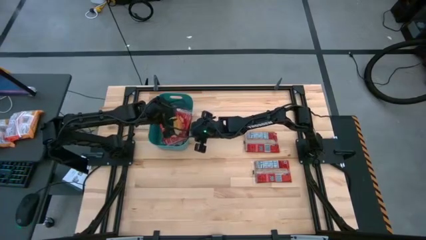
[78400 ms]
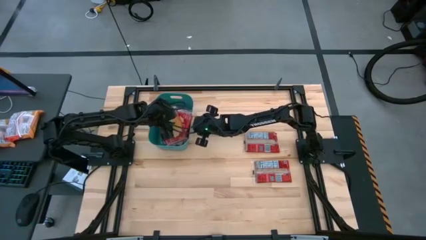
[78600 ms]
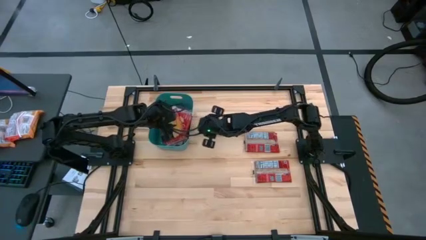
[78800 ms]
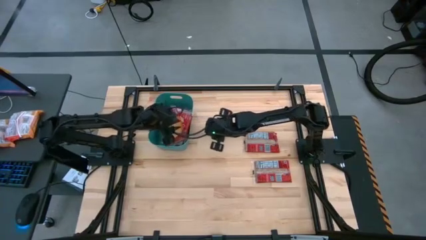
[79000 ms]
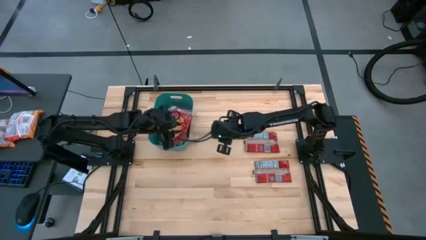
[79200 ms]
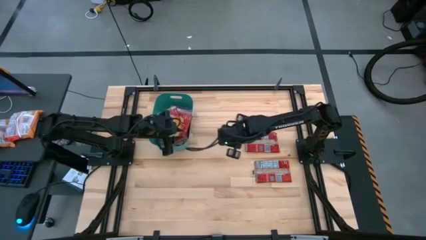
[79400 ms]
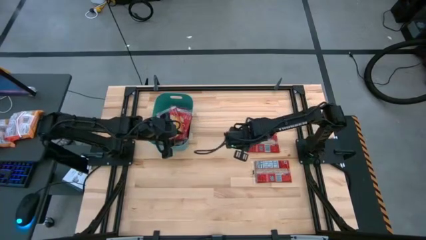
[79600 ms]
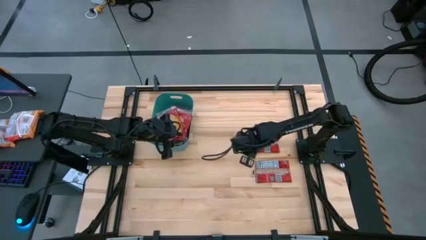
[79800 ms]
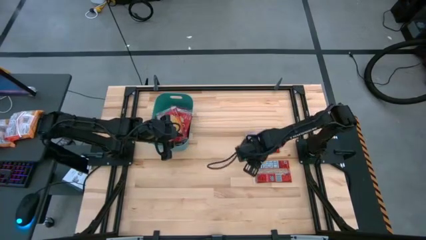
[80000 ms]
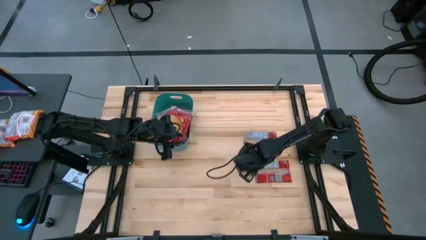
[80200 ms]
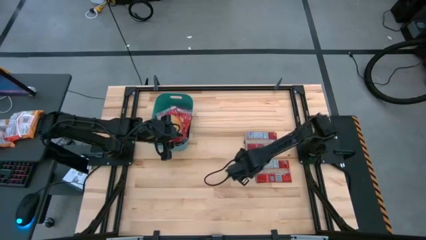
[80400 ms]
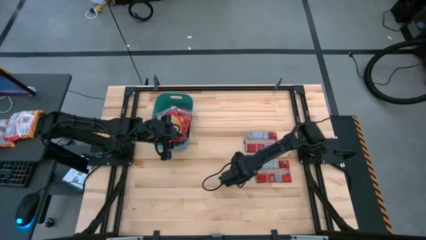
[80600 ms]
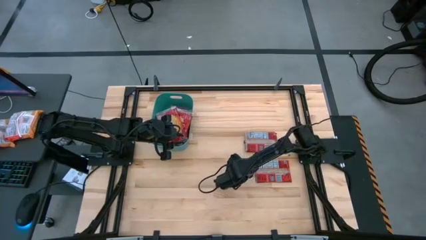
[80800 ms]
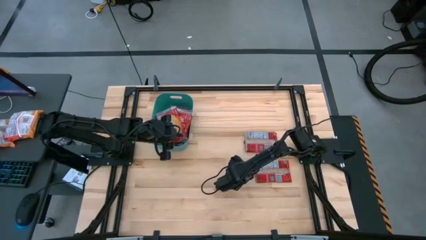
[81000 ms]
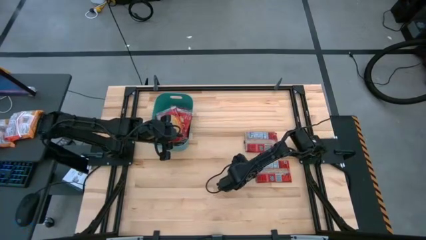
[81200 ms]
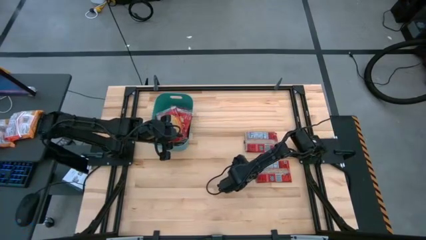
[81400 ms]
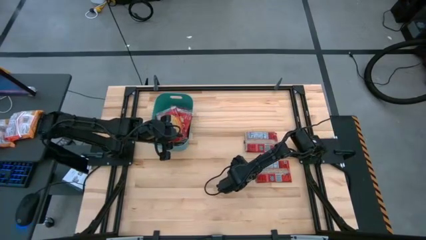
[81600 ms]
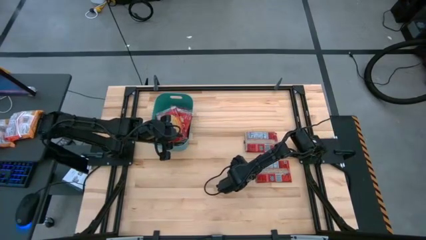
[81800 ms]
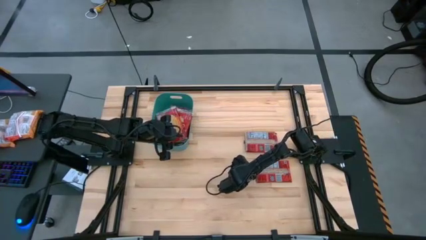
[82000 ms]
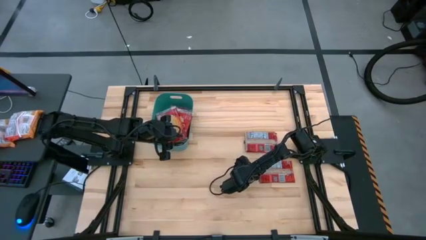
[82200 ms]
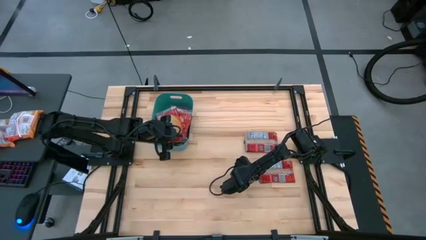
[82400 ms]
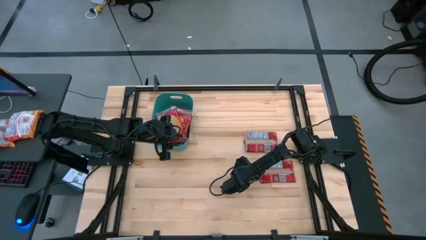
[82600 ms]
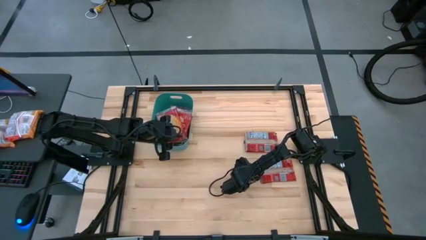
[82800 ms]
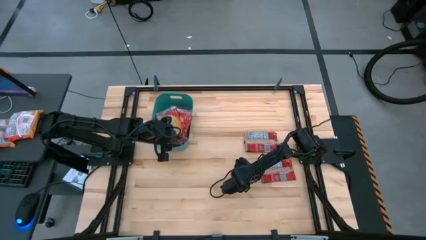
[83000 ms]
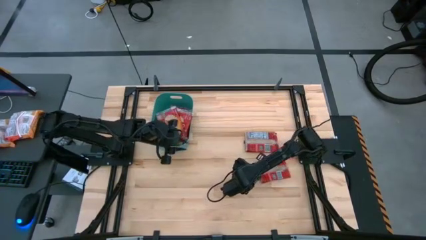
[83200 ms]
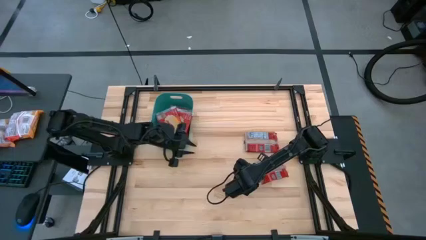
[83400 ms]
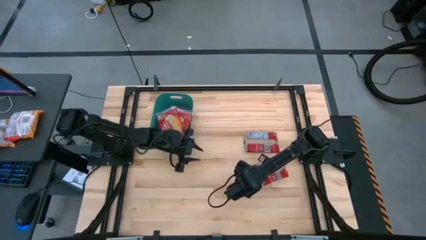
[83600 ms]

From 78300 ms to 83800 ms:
Task: Sort popcorn bags into baskets
Put the red popcorn bag into the green bin

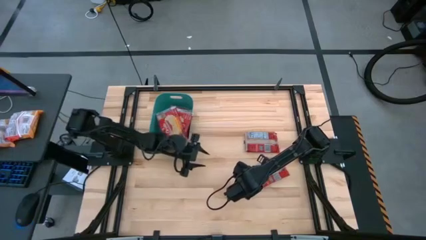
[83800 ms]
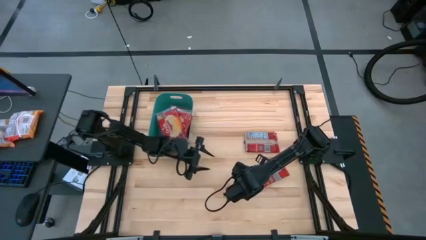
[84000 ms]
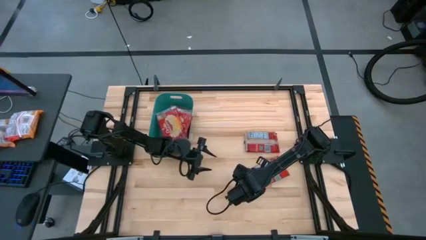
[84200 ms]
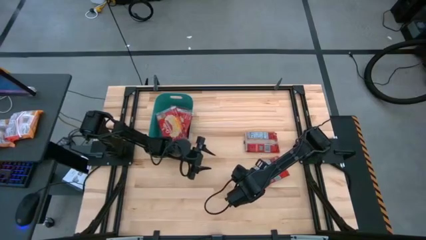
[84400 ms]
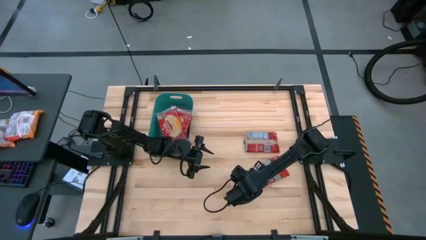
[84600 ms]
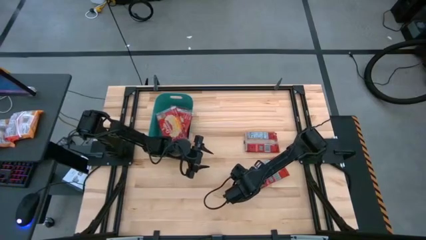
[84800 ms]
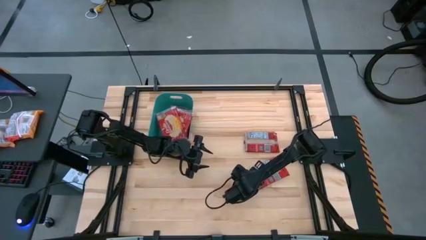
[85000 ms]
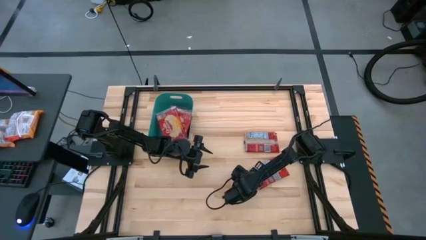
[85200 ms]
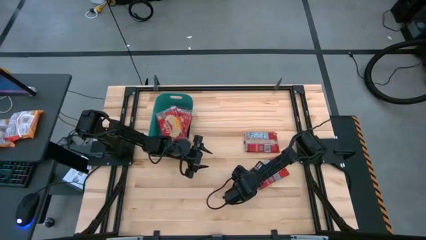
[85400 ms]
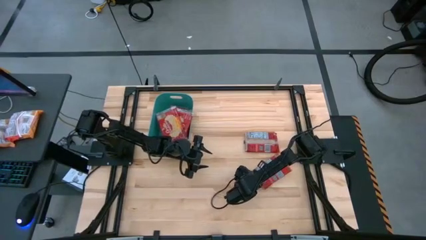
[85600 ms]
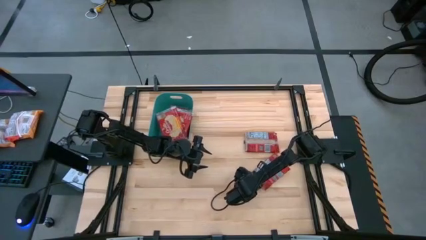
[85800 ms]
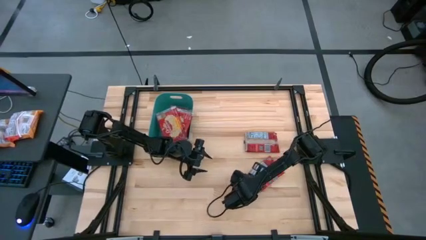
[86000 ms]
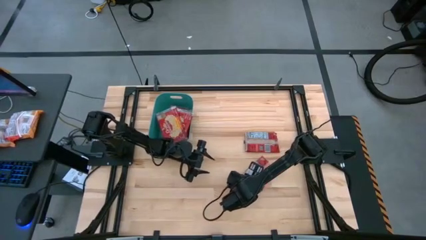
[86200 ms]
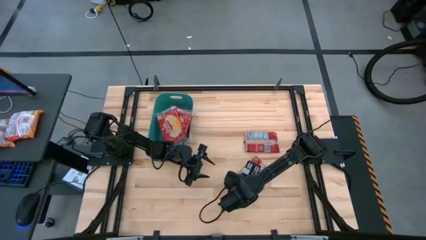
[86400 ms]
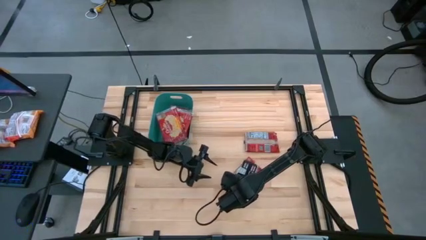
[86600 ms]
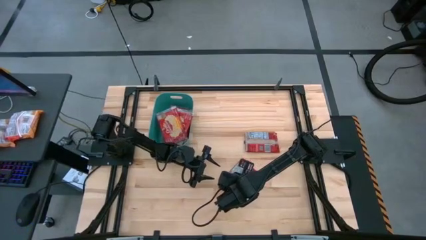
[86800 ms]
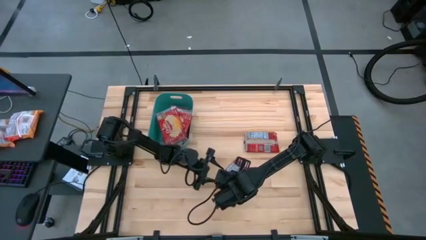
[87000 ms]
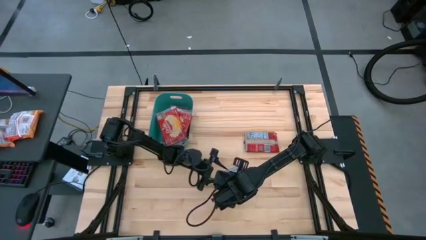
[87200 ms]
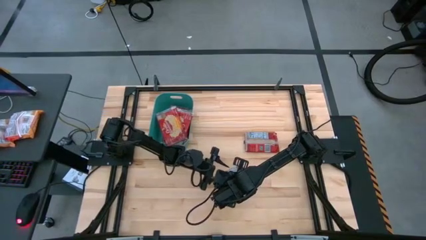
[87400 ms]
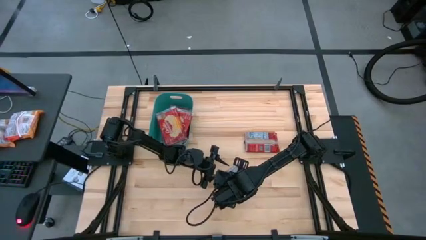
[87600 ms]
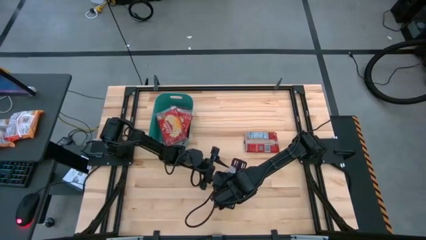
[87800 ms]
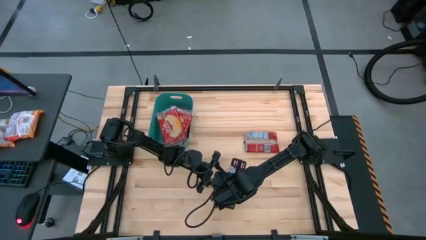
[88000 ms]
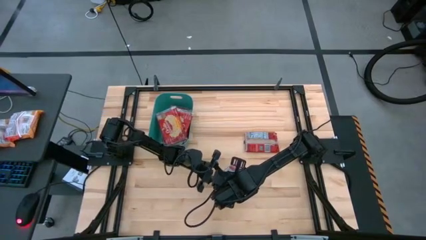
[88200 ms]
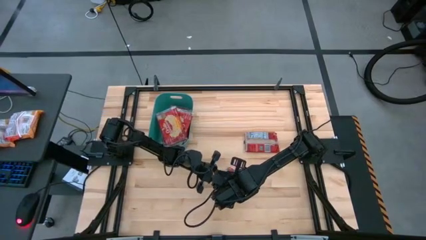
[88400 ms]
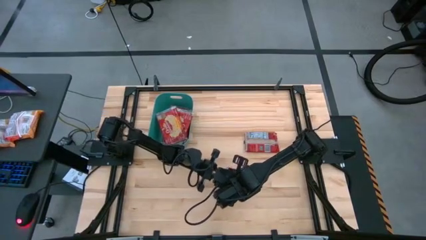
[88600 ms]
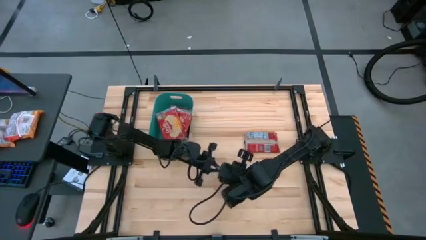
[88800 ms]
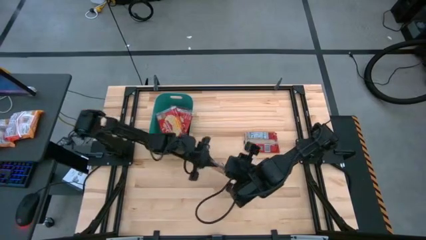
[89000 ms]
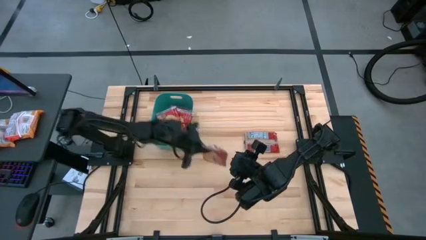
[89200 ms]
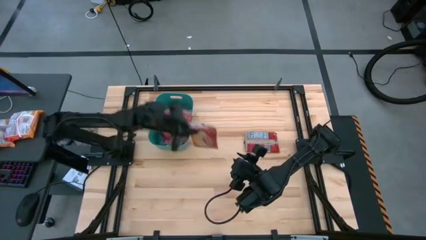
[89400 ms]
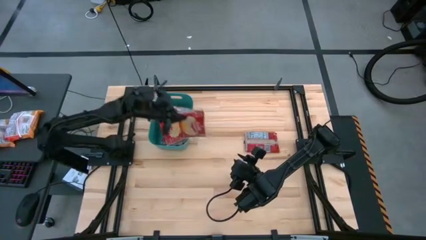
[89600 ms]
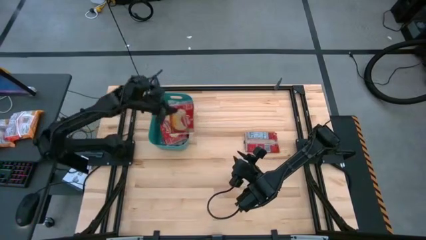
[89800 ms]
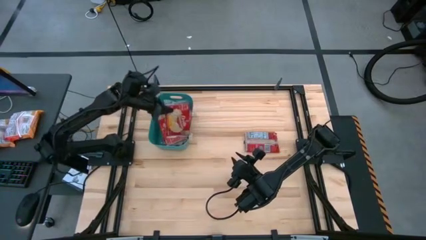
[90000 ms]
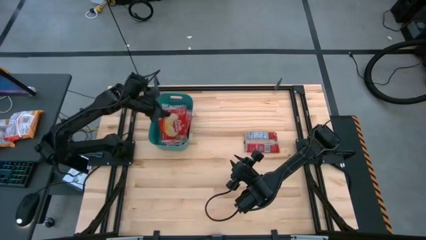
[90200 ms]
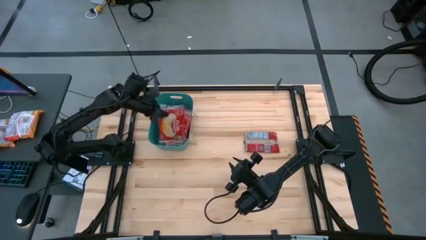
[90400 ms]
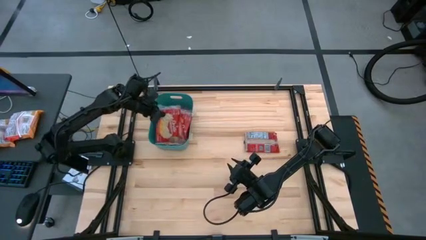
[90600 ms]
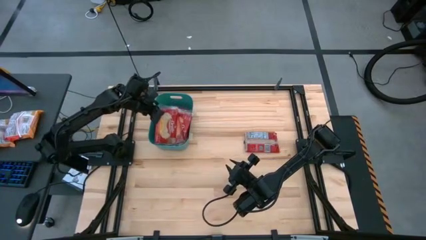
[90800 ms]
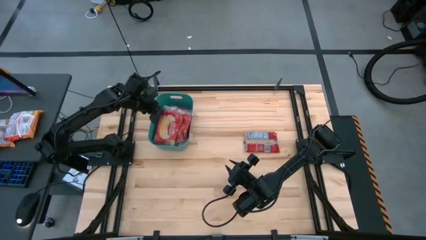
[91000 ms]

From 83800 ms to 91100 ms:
Put the red popcorn bag into the green bin

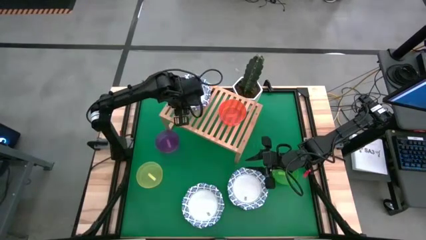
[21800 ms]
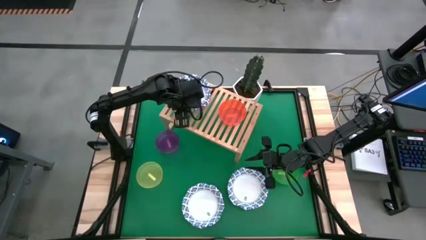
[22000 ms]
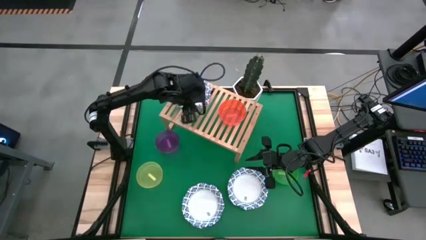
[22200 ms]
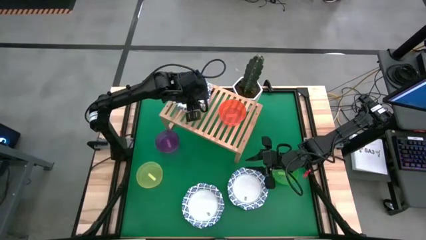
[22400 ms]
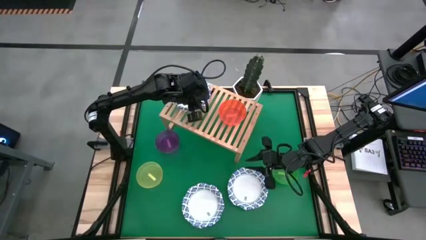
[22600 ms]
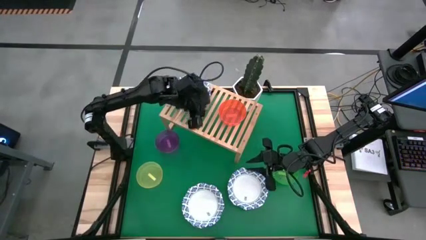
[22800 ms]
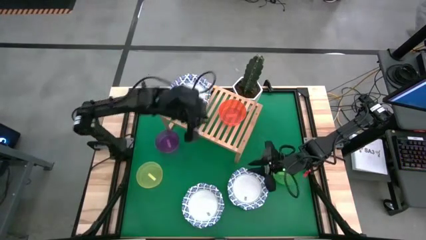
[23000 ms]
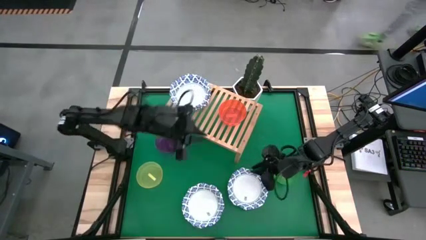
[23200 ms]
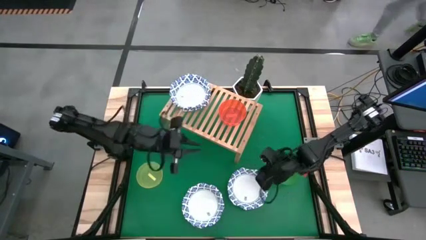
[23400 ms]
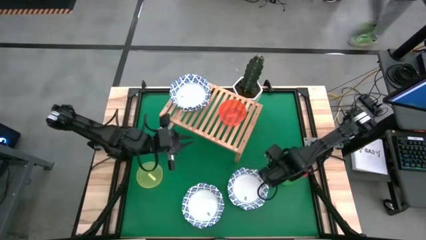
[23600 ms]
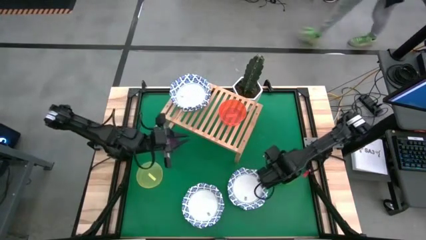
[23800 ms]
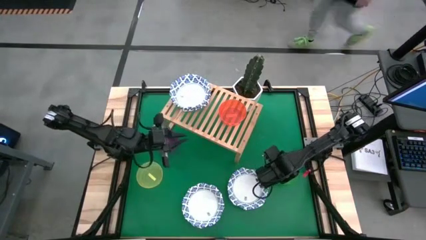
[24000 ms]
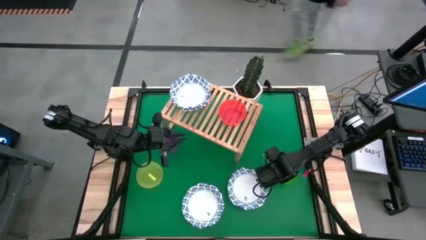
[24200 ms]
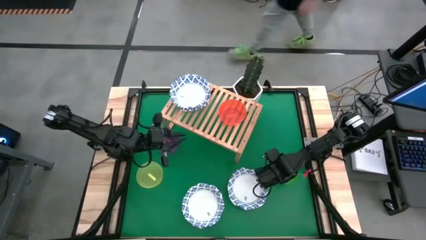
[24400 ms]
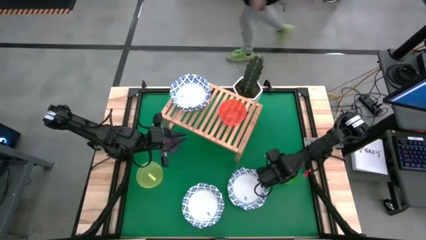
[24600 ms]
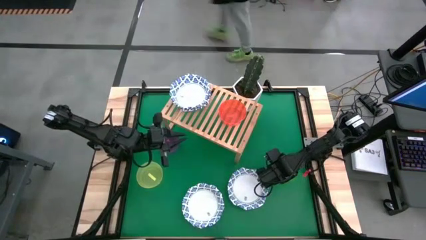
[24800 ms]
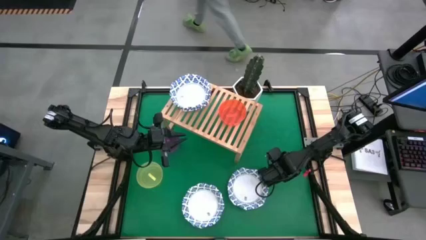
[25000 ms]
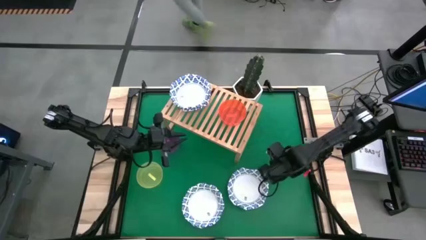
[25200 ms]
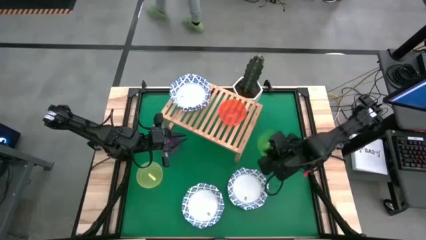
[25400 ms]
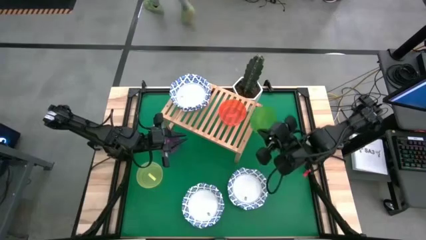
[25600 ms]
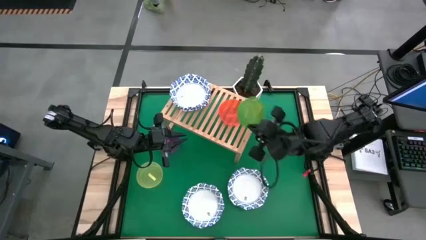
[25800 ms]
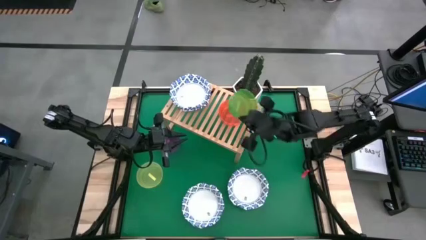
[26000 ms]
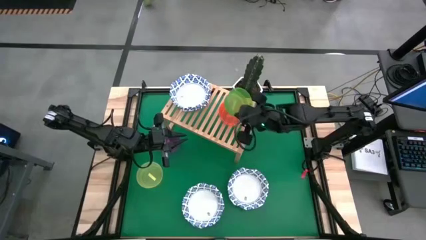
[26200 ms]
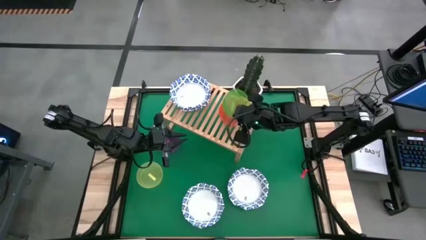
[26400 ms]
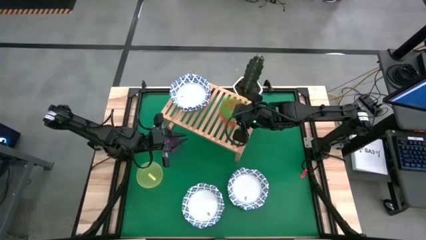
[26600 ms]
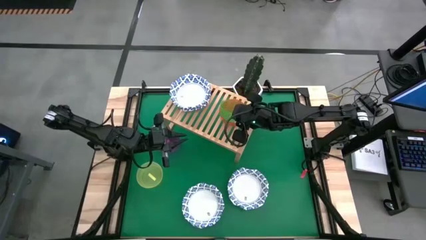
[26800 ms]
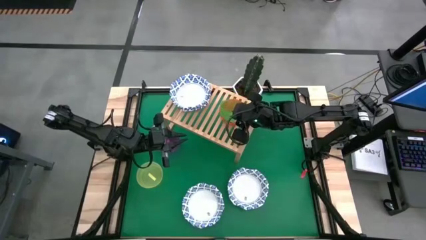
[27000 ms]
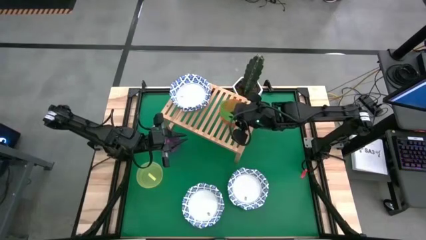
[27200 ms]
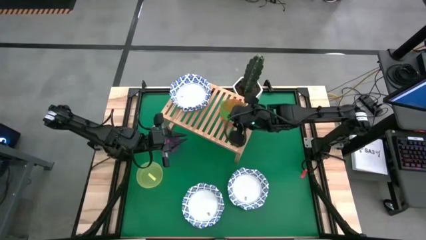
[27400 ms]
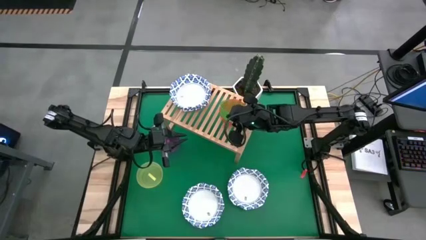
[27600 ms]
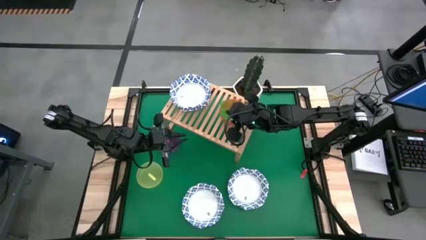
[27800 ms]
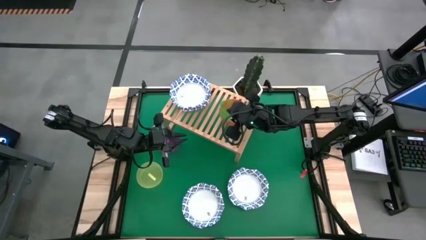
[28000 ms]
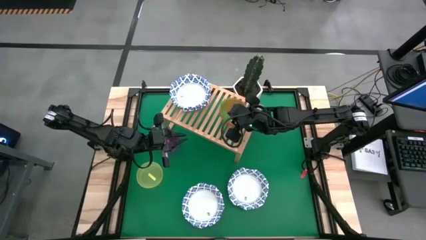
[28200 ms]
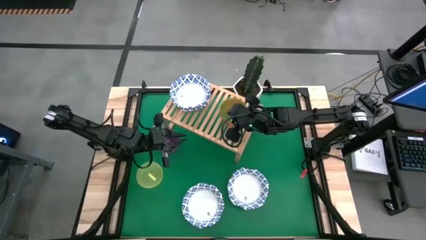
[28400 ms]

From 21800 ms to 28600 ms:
Task: Place and stack bowls onto a shelf
Stack the green bowl on top of the orange bowl on the shelf
